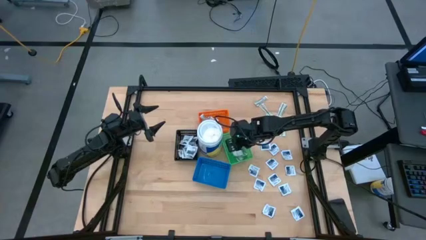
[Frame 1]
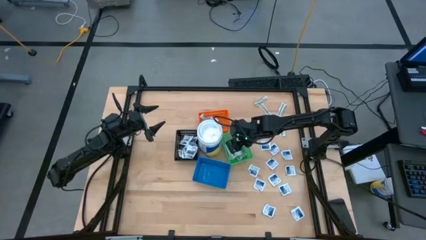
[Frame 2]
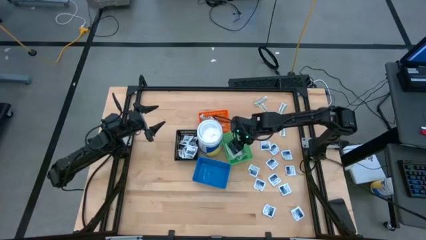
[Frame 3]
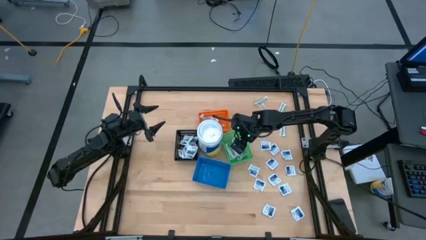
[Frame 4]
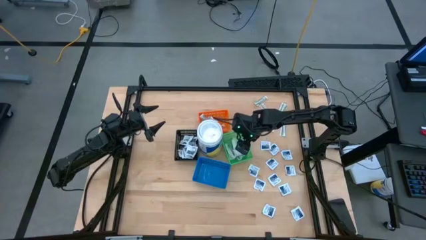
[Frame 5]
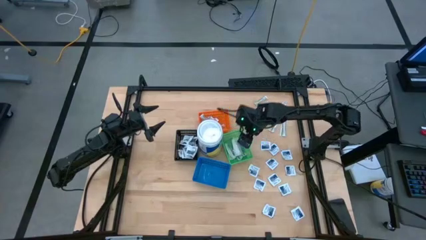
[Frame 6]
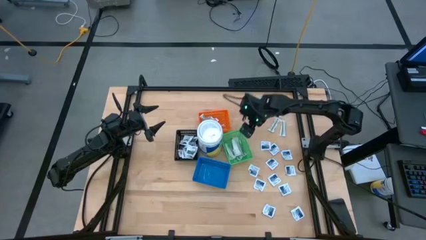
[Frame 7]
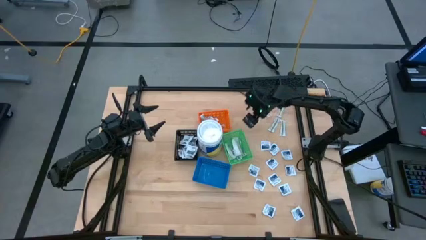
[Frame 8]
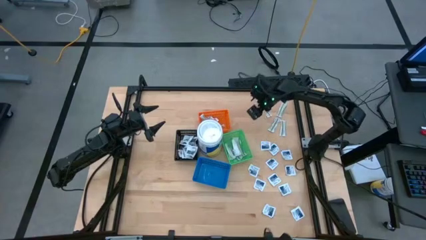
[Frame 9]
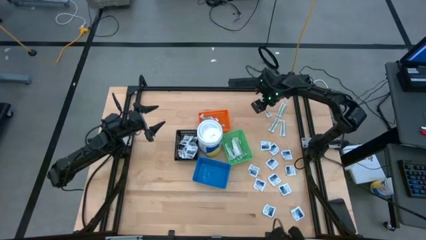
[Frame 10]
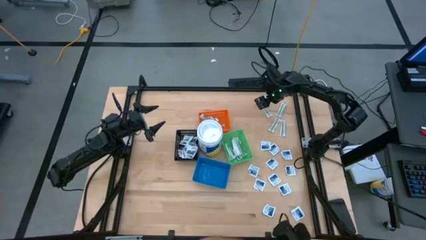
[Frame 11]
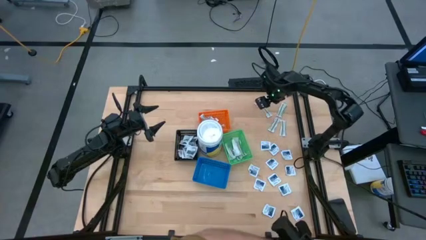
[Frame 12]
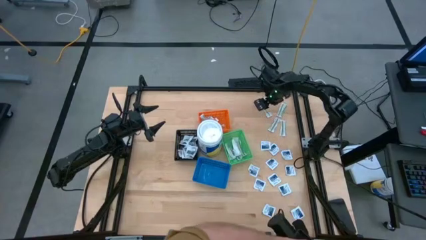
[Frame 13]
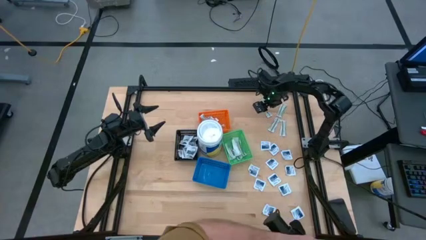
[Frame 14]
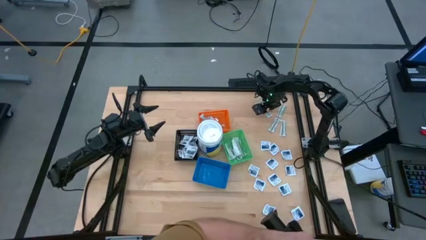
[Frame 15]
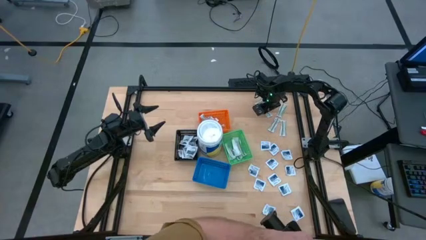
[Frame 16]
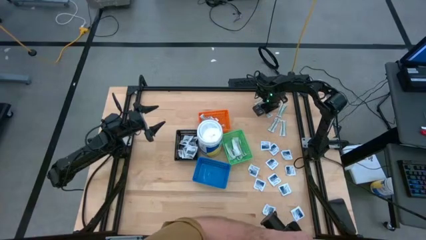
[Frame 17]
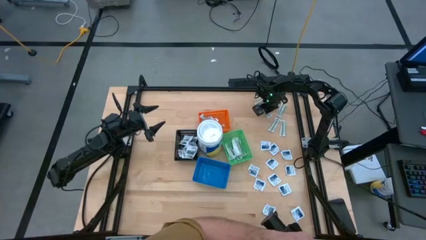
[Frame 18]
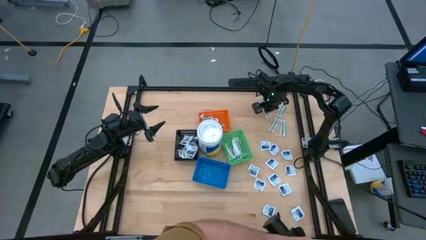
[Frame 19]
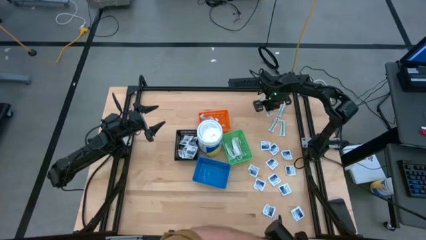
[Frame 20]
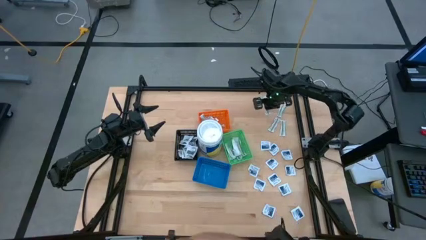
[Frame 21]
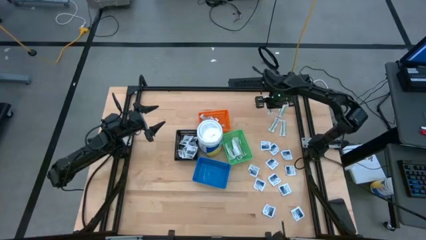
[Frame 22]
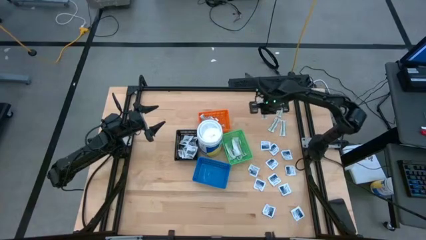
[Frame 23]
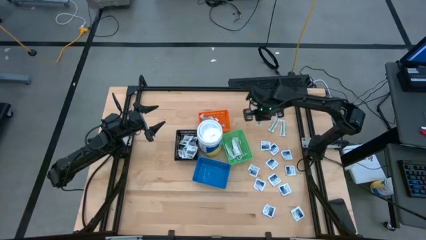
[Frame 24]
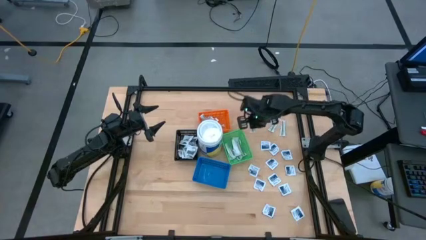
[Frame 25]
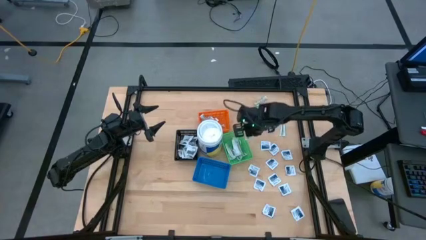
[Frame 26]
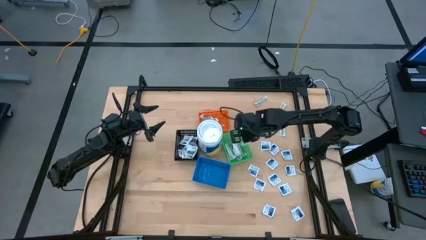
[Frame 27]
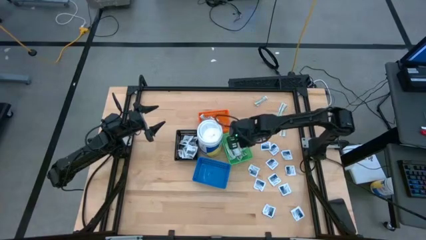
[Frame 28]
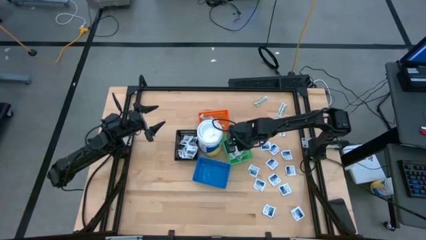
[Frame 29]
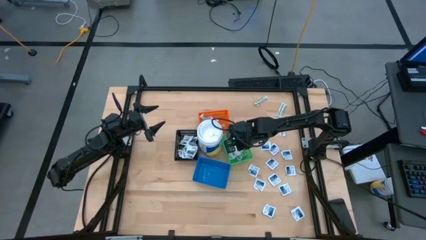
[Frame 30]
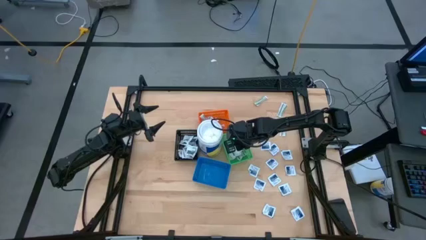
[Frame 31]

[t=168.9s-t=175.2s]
Task: Pick & Place First Aid Supplies
Put the green bandage pack into the green bin

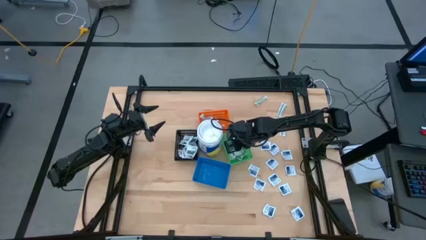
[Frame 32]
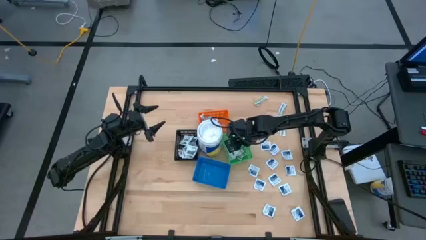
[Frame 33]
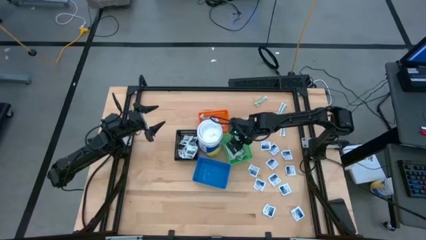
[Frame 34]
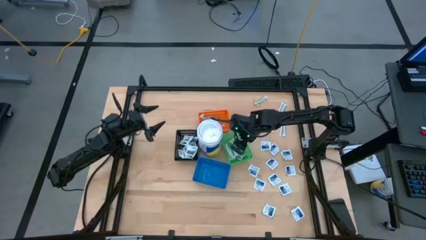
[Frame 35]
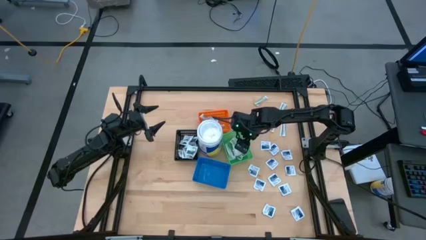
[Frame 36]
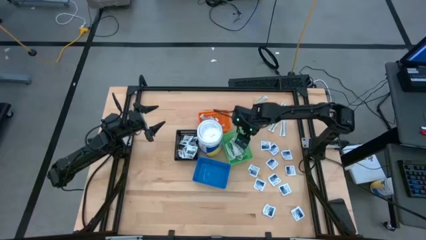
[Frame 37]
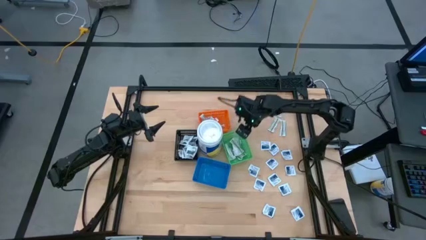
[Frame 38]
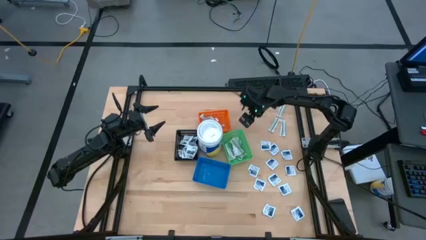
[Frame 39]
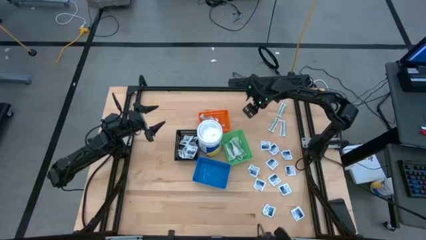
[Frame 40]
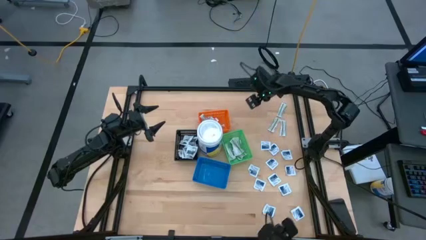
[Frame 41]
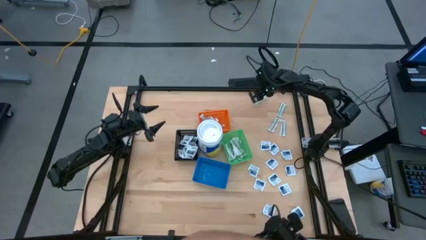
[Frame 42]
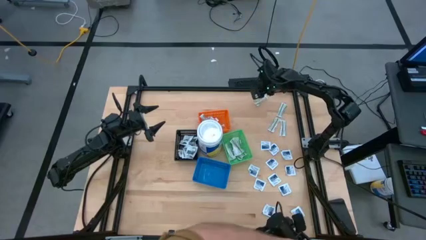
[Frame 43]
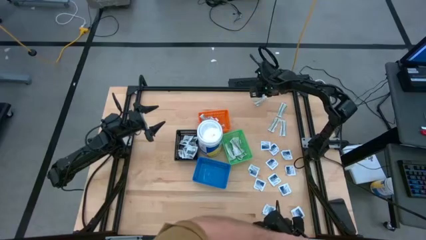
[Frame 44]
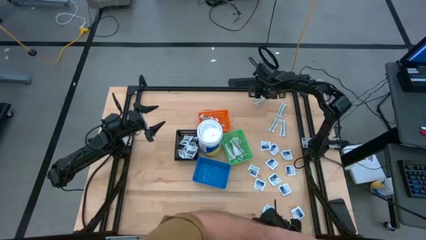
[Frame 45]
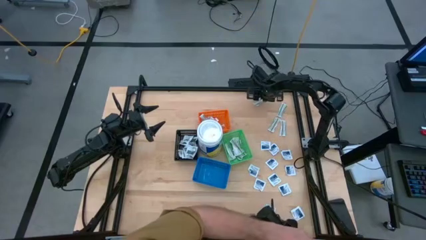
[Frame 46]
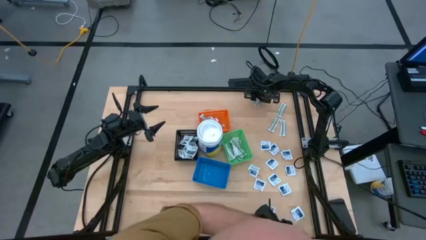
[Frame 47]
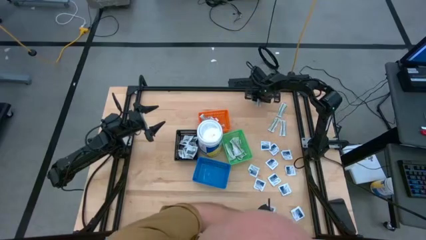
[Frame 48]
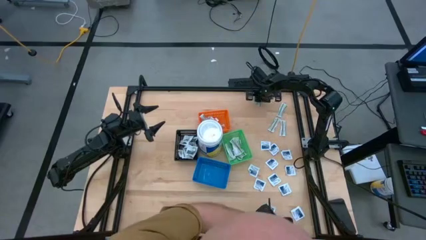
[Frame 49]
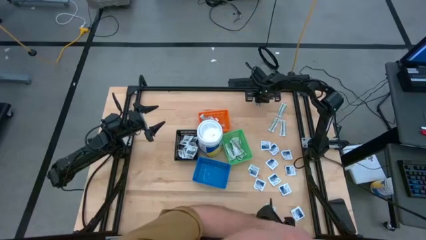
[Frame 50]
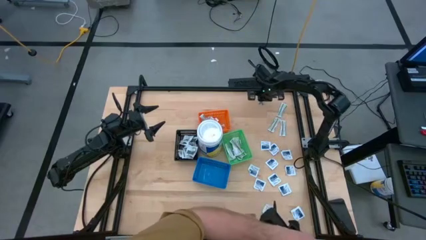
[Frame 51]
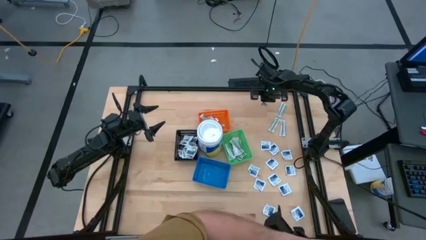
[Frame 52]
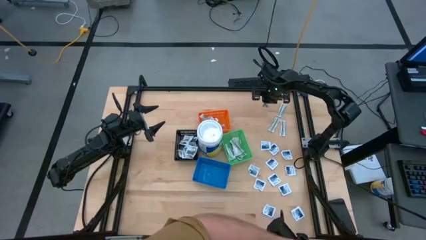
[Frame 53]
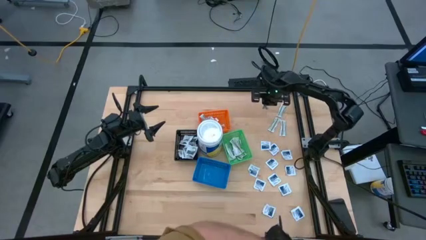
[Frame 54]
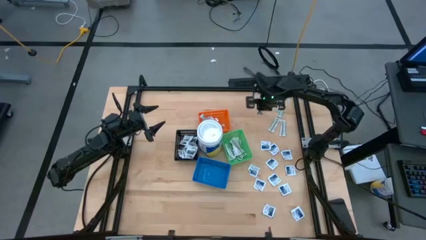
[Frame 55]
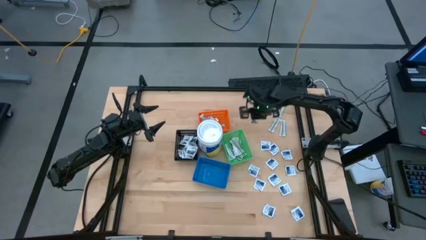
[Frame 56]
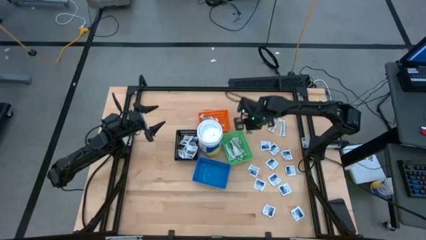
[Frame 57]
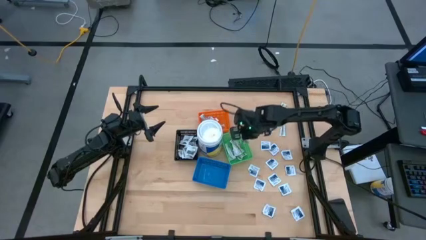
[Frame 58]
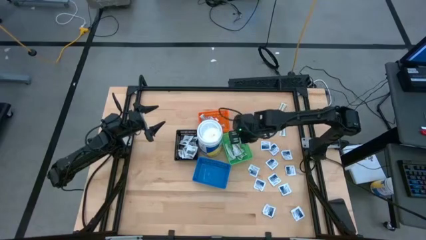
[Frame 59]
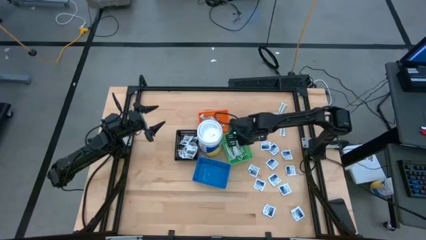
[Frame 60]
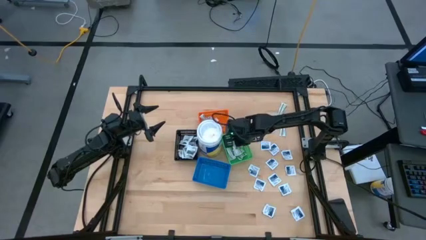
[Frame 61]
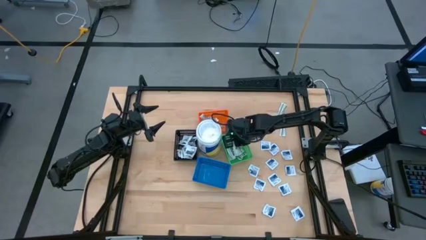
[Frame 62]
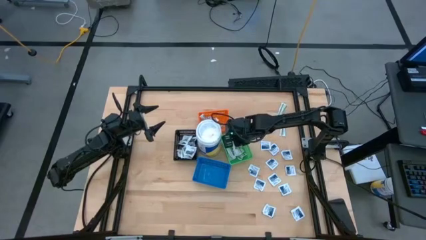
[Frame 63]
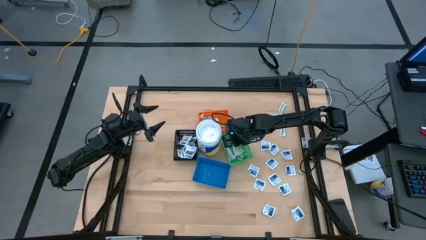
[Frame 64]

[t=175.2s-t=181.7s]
Put the green bandage pack into the green bin

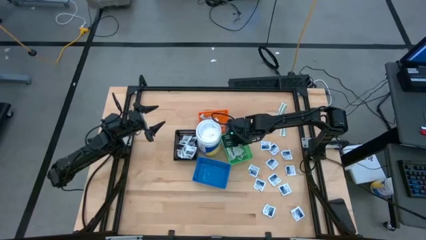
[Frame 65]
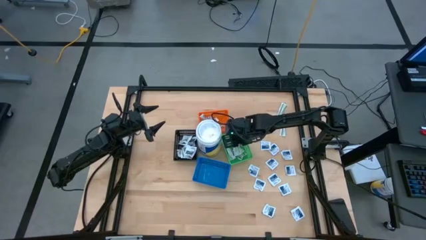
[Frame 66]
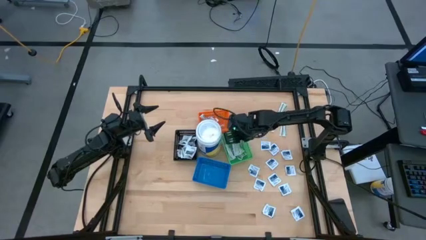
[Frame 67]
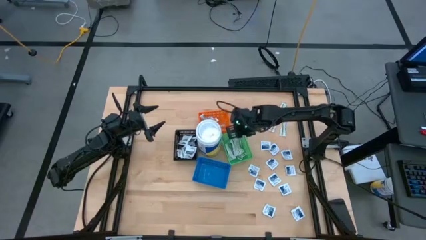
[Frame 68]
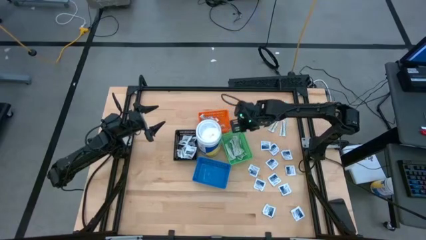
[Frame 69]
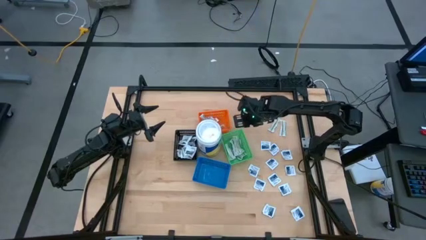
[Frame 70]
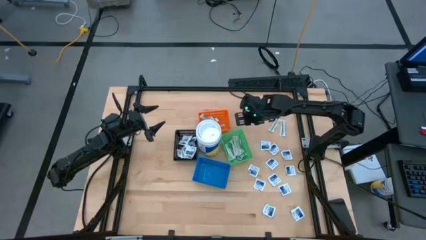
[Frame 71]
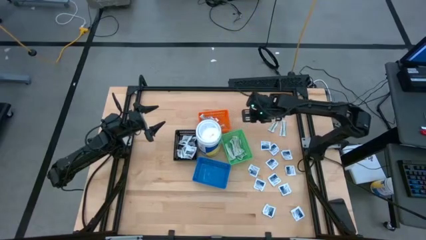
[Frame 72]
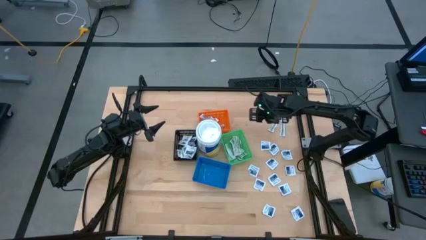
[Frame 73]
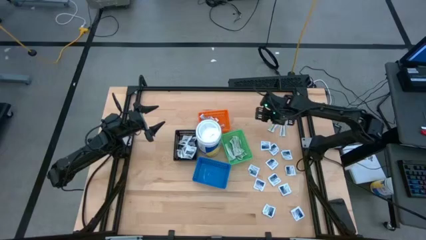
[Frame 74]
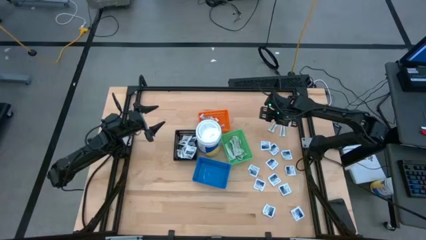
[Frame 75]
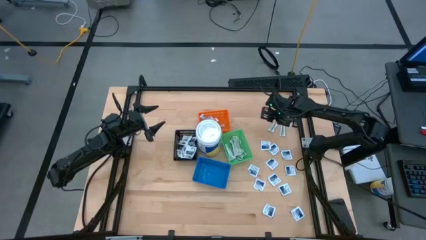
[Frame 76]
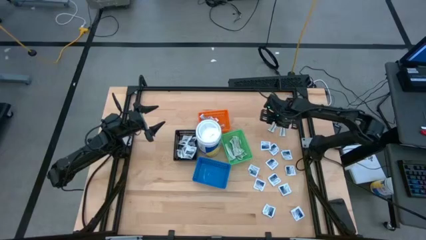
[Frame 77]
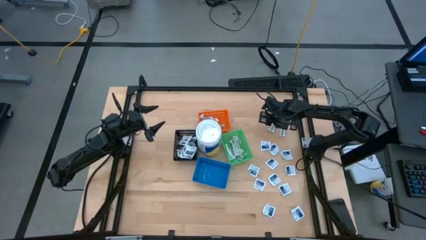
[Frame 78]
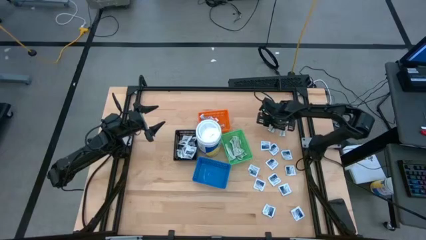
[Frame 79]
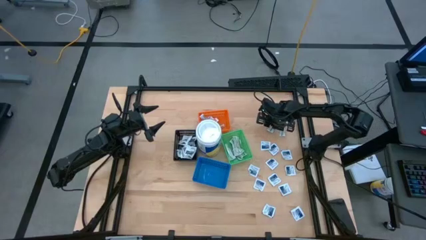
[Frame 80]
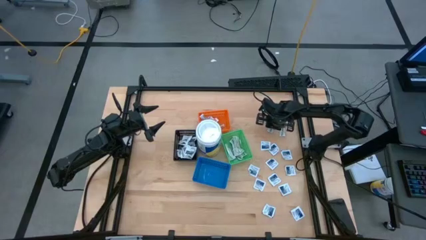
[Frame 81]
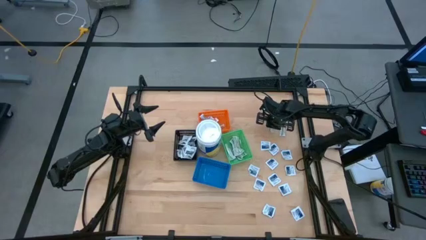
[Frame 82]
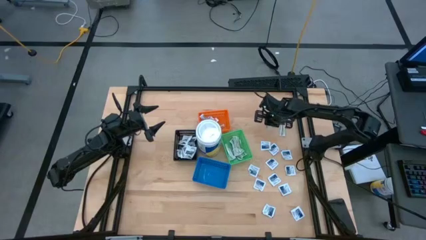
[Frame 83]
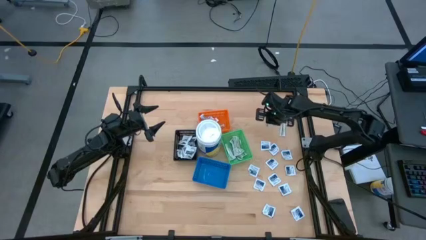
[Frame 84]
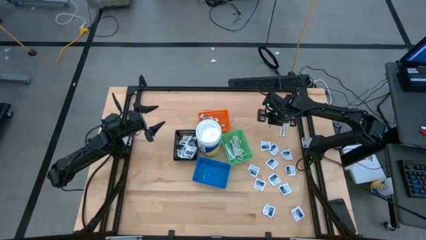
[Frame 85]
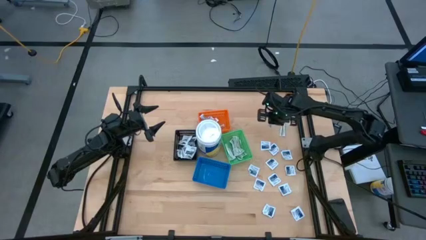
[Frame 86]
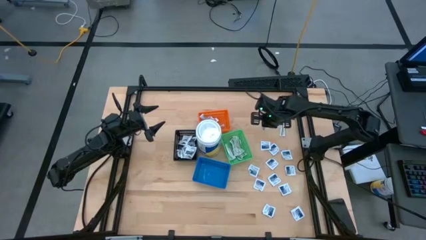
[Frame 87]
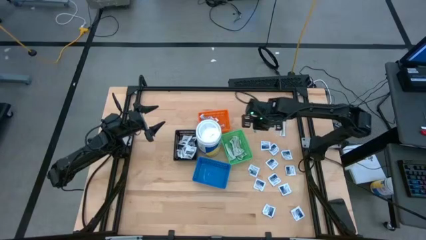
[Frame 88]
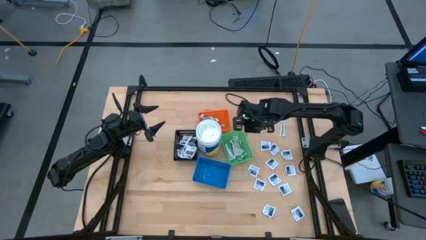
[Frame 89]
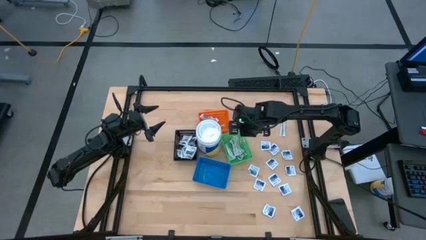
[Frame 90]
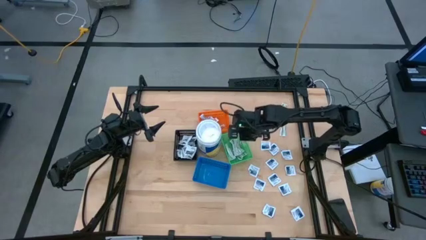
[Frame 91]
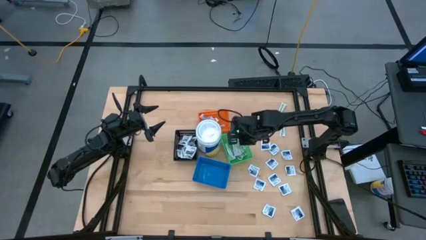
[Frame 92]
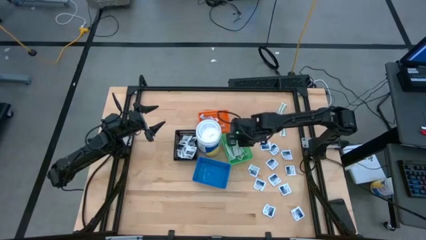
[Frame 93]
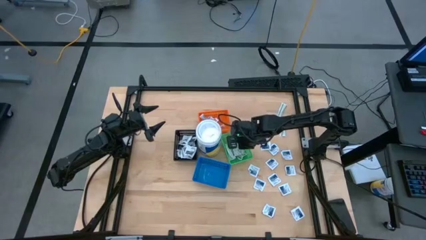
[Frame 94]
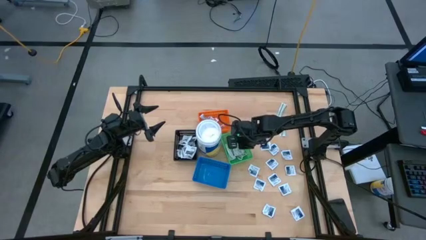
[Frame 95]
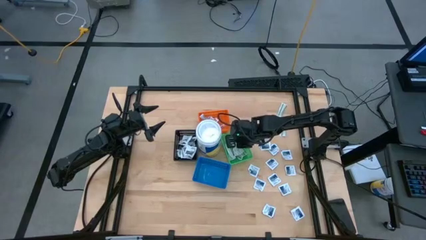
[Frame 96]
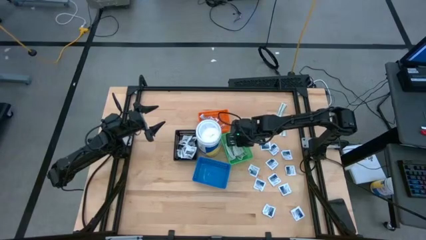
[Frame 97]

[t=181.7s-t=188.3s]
Put the green bandage pack into the green bin
